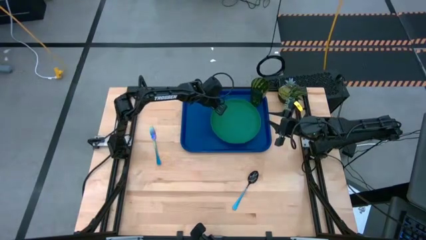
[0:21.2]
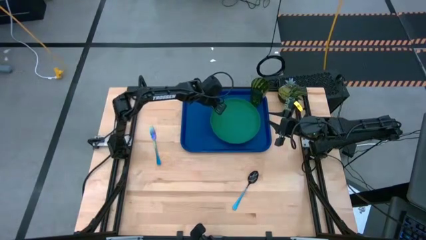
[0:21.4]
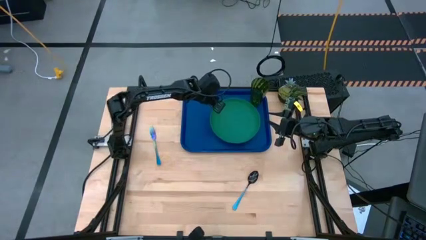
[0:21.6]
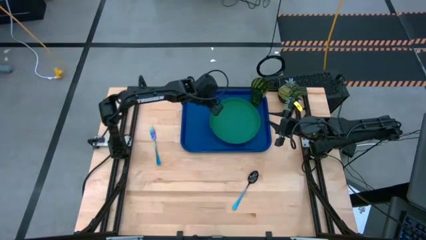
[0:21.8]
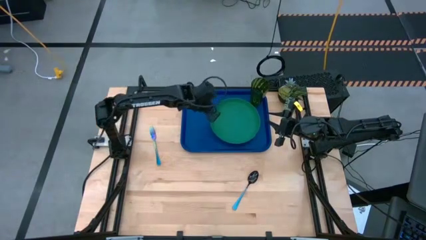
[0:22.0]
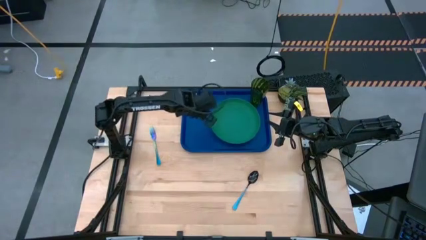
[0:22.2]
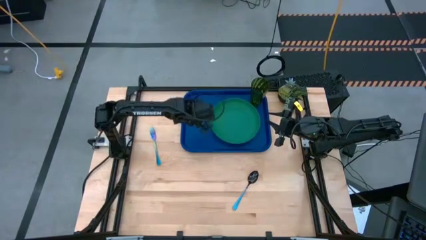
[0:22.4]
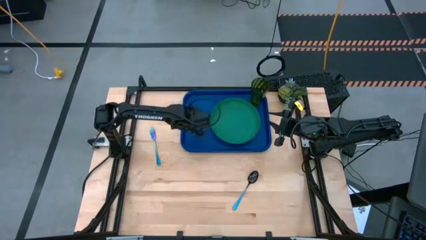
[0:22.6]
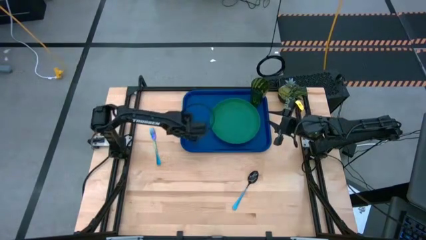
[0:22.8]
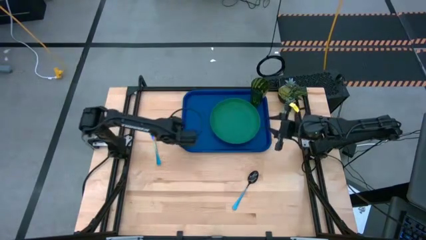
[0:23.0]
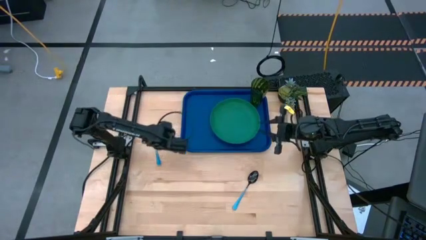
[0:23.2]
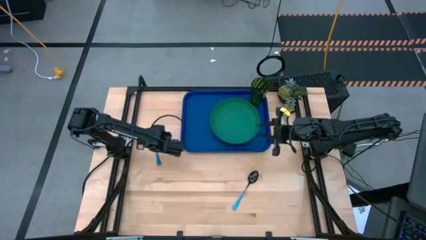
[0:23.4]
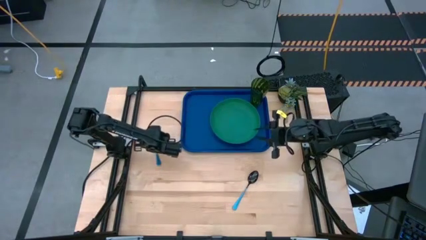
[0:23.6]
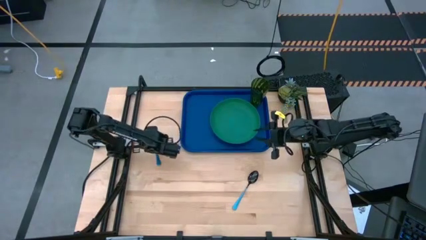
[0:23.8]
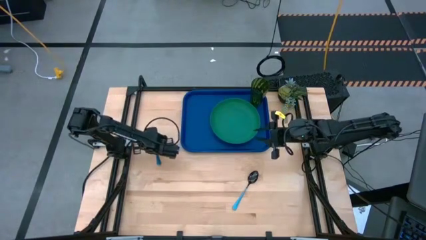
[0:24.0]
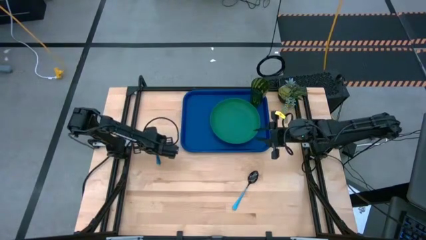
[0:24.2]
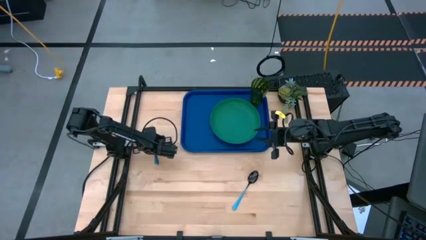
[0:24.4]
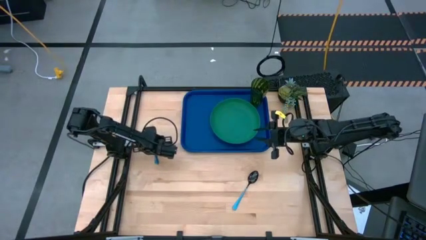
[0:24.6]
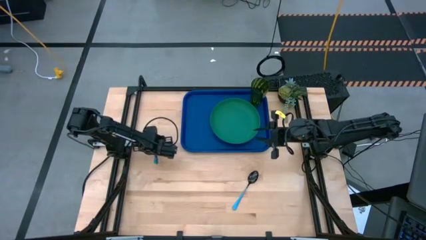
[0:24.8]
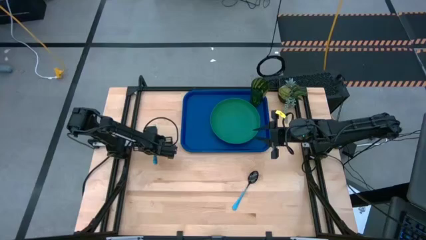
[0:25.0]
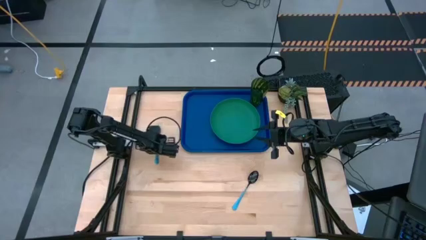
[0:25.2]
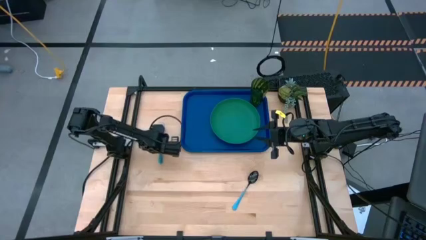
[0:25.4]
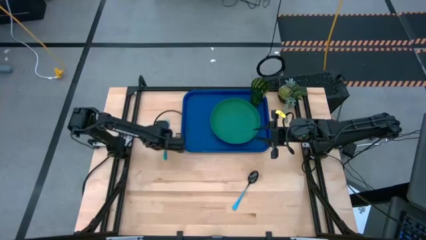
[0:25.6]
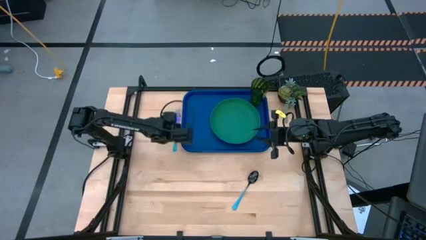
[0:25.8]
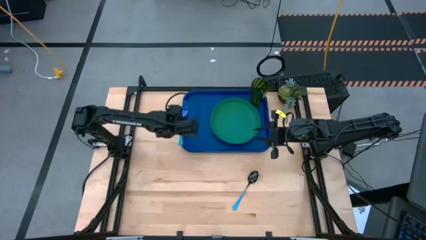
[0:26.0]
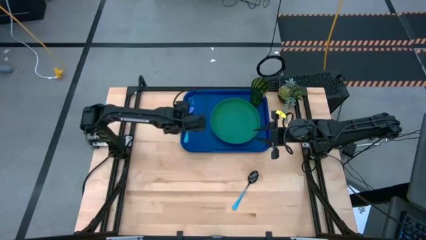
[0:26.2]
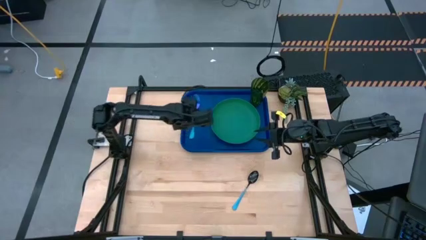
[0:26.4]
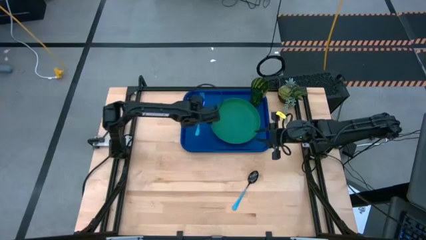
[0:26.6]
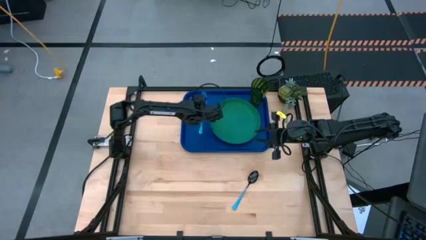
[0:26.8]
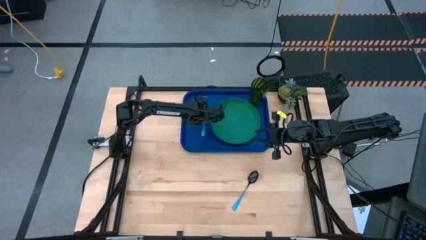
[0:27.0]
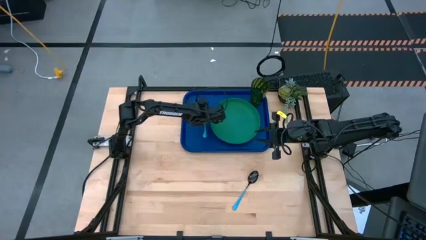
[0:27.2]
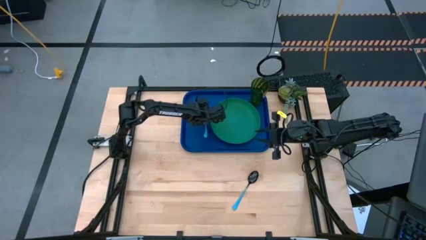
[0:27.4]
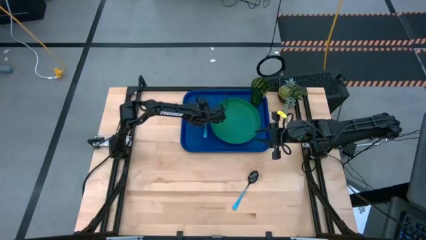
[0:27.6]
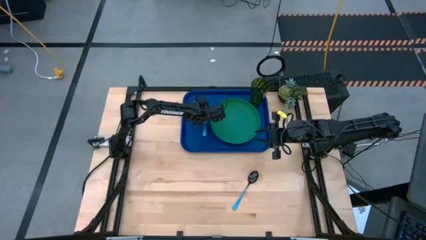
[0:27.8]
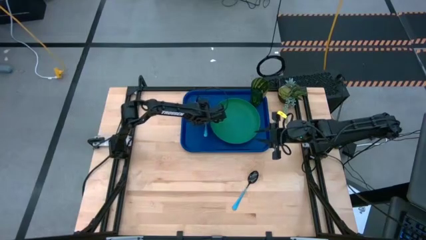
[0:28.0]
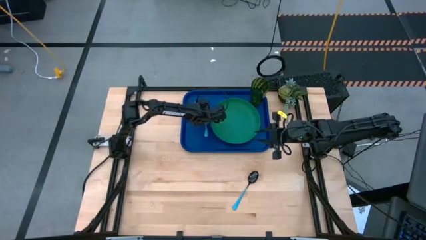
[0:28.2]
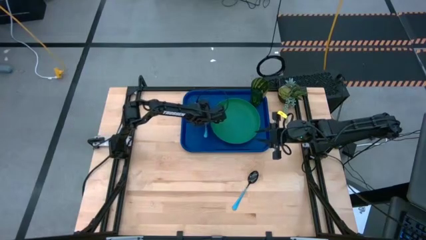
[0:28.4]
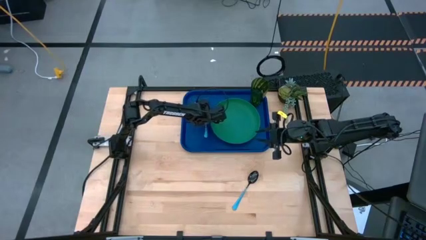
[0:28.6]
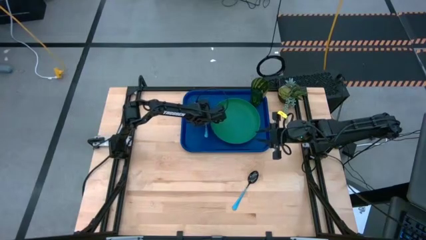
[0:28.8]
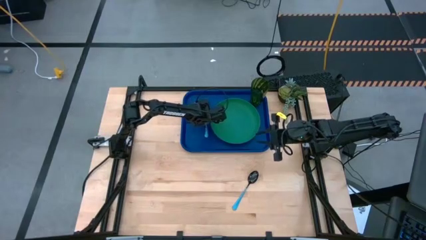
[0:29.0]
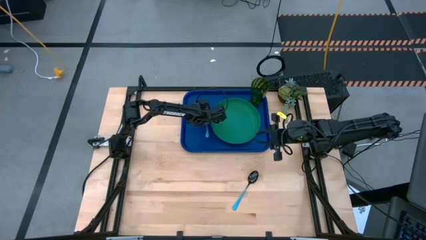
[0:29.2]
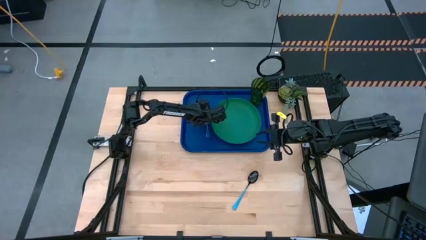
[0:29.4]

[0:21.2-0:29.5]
Task: Pick and place plate/cup/fork/spoon on tray
Put the blue fork on the blue serving tray to the left of the green plate

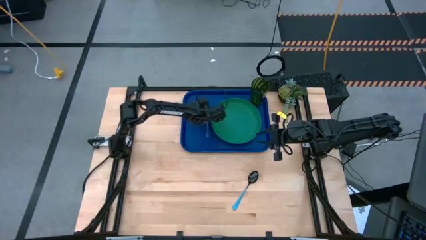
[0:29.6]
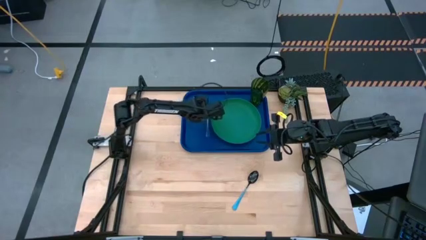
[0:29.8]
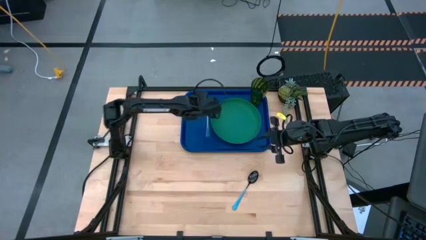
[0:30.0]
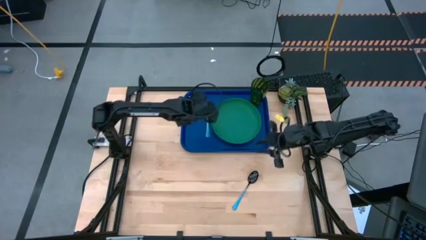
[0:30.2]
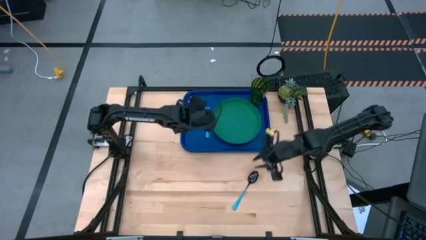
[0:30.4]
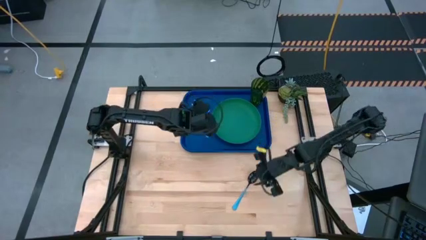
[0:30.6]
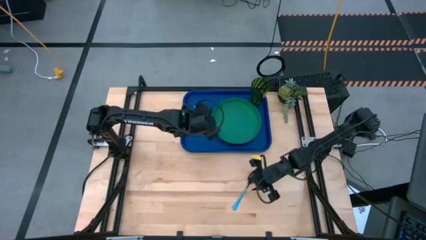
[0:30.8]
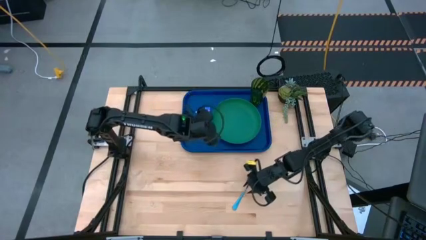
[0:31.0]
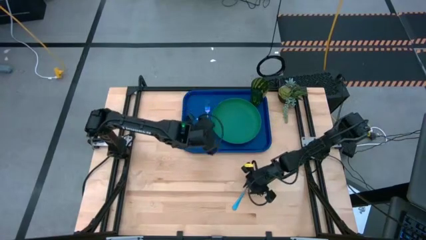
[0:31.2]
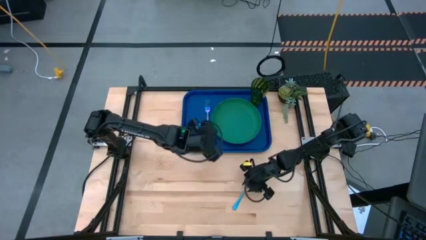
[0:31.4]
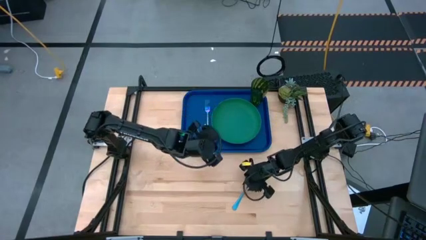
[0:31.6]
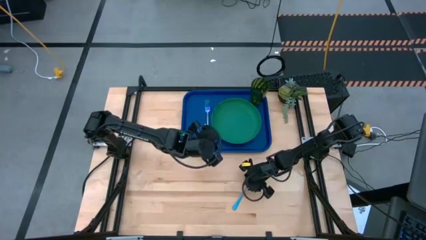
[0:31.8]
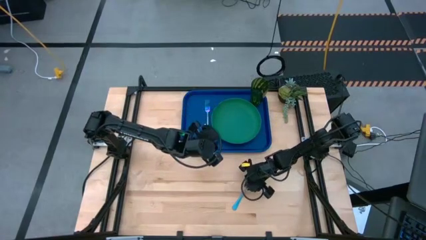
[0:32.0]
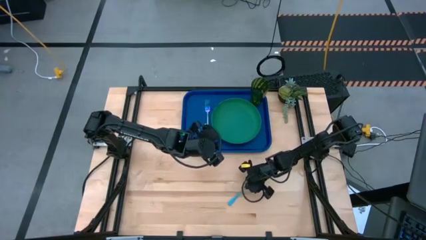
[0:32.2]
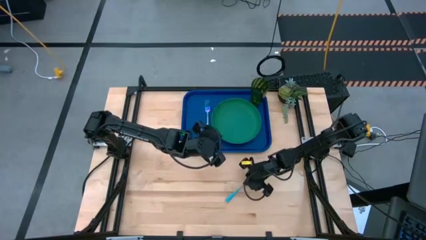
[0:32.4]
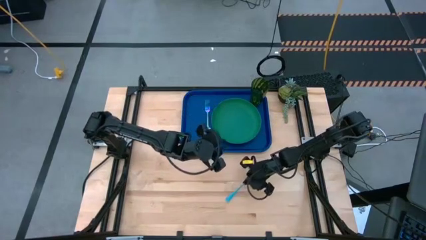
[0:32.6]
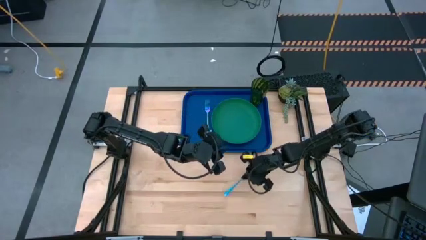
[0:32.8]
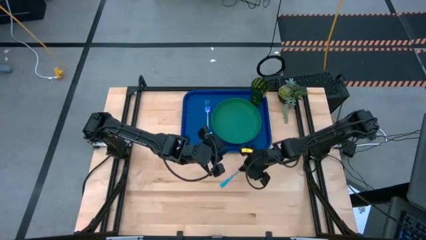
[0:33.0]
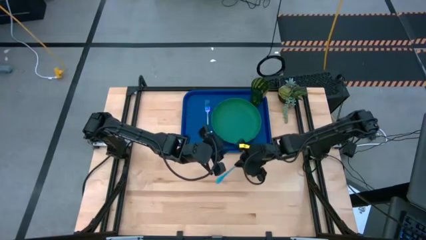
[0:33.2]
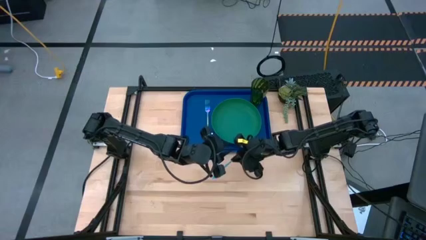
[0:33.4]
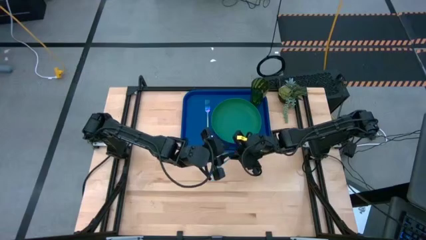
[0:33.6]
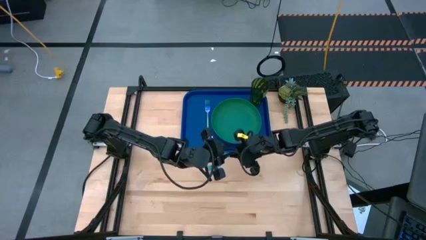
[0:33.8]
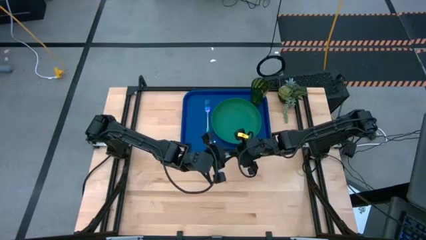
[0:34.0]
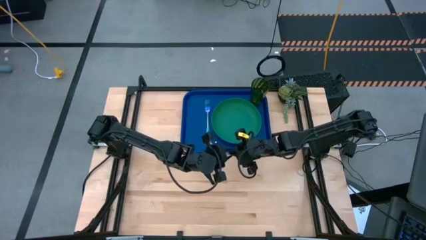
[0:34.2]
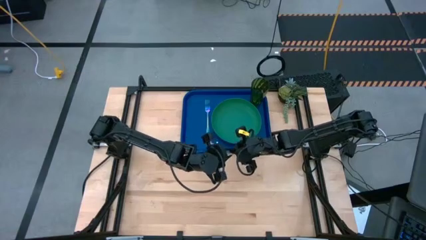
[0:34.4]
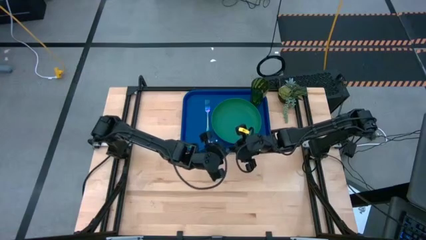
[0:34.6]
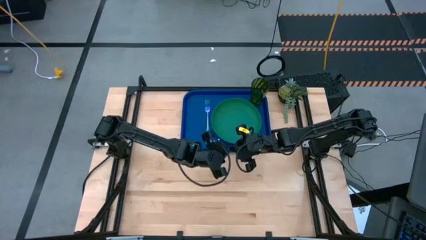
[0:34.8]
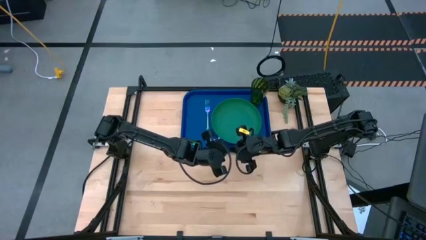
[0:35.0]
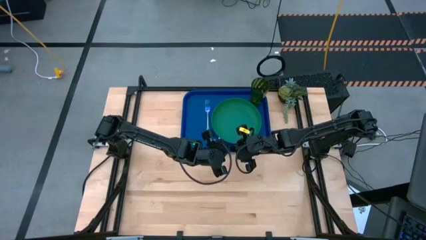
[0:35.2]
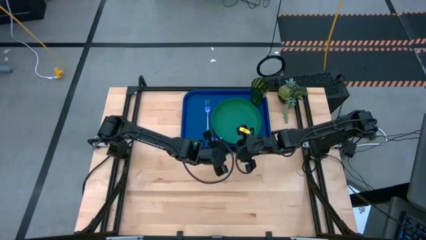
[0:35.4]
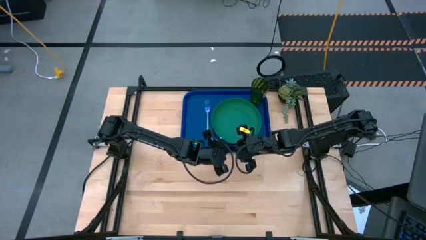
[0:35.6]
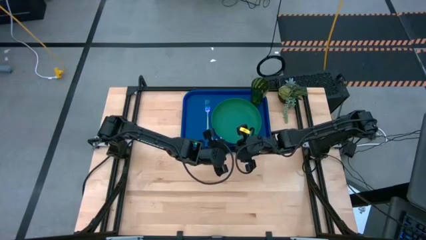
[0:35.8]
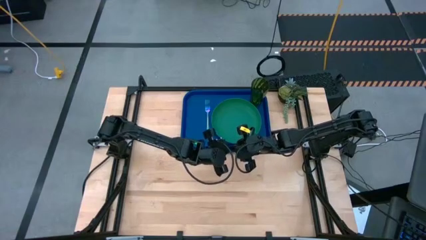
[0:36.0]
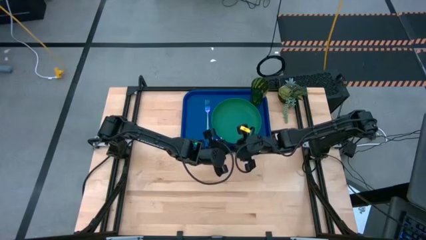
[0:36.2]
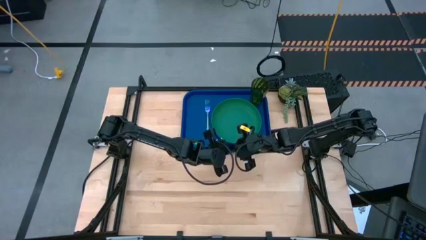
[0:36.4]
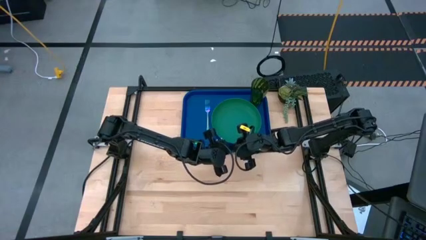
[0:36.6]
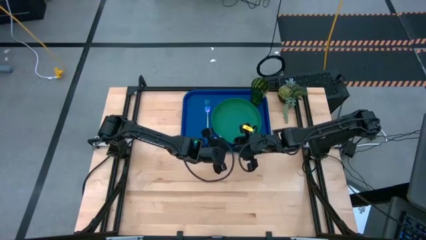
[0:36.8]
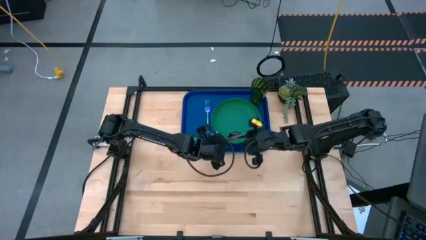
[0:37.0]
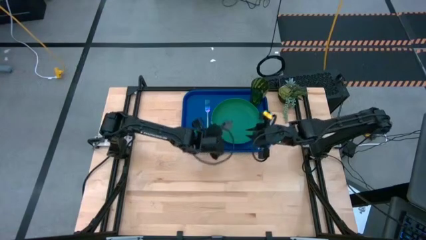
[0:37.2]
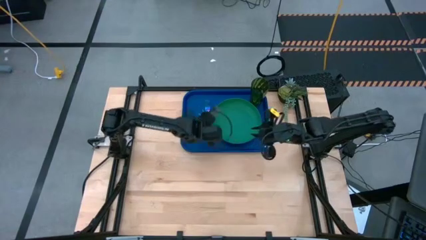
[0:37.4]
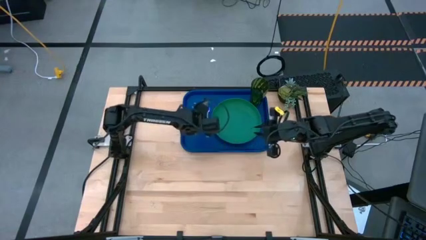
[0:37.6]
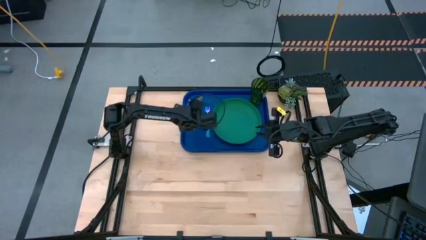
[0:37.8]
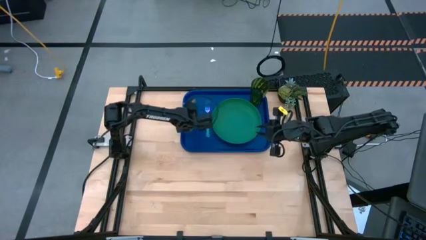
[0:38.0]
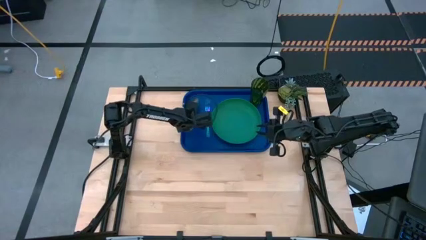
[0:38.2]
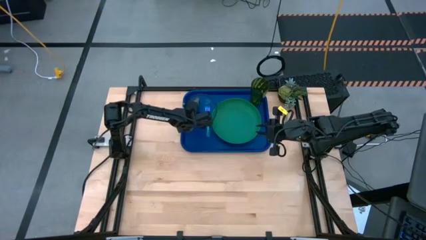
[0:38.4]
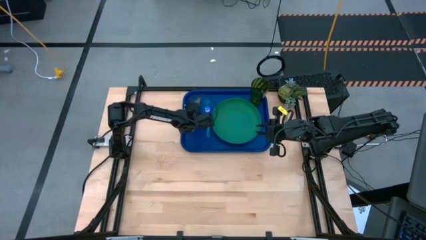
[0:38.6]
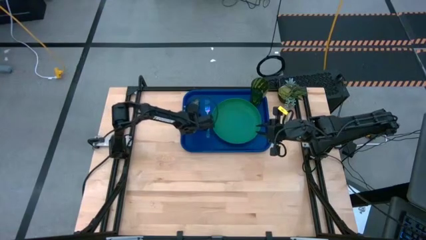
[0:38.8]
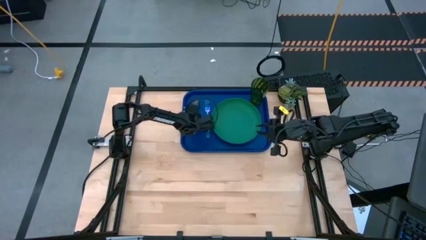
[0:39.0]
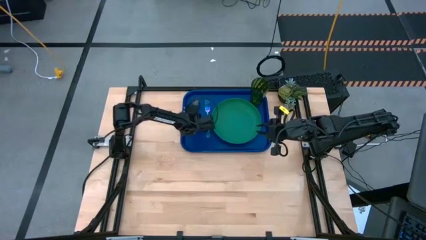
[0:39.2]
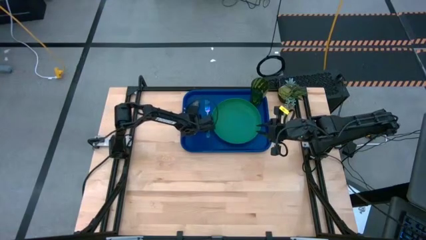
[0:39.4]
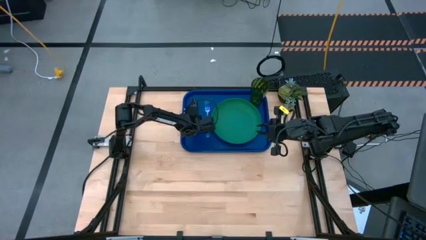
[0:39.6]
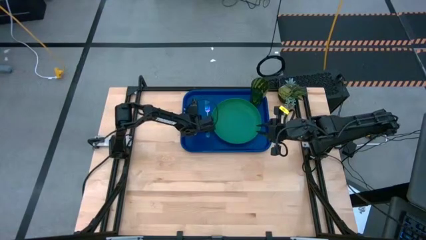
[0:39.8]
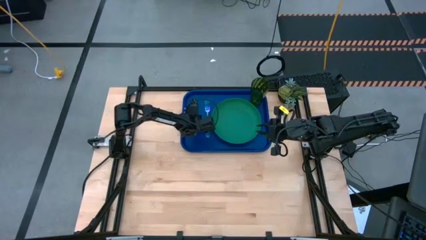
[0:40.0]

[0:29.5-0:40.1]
Put the light blue spoon on the blue serving tray to the left of the blue fork
